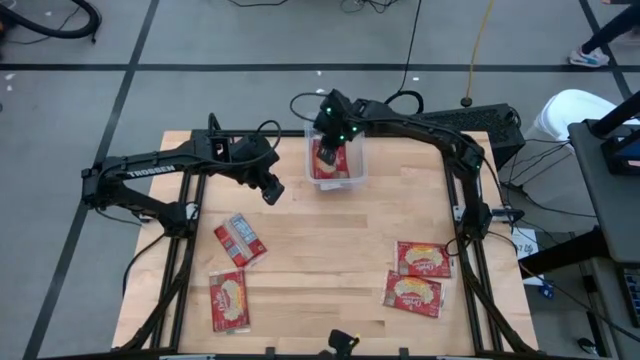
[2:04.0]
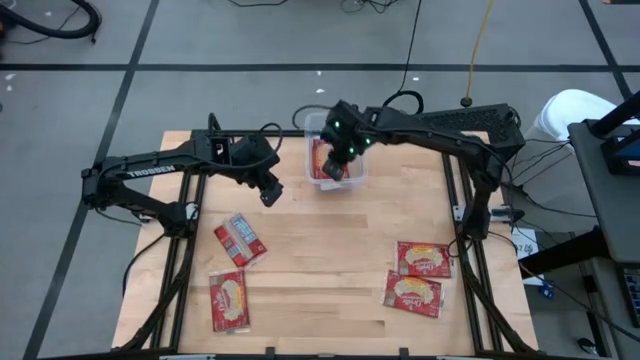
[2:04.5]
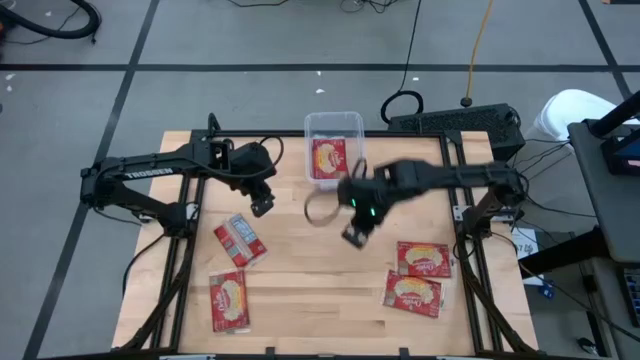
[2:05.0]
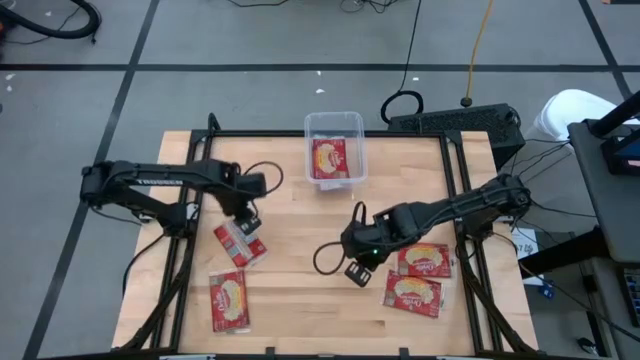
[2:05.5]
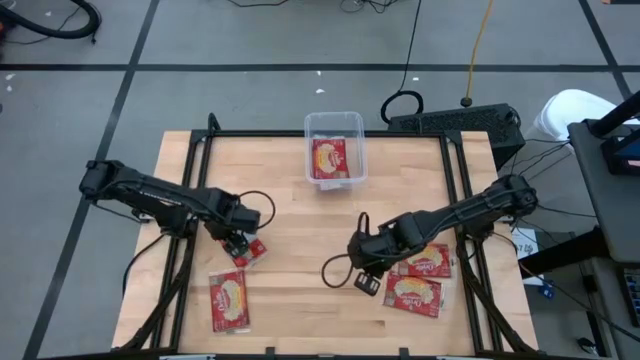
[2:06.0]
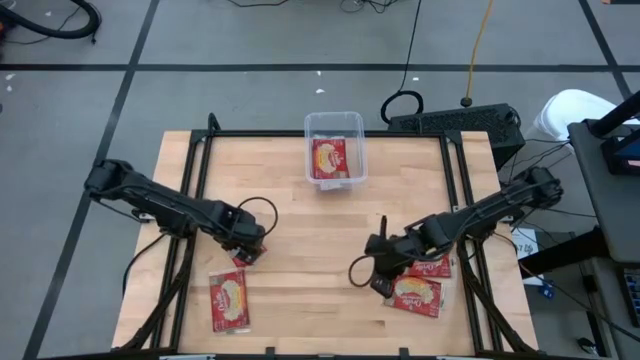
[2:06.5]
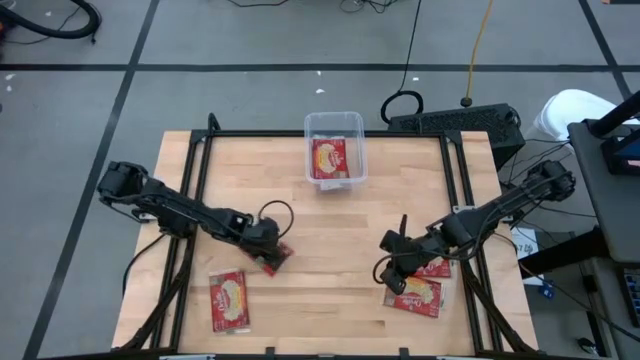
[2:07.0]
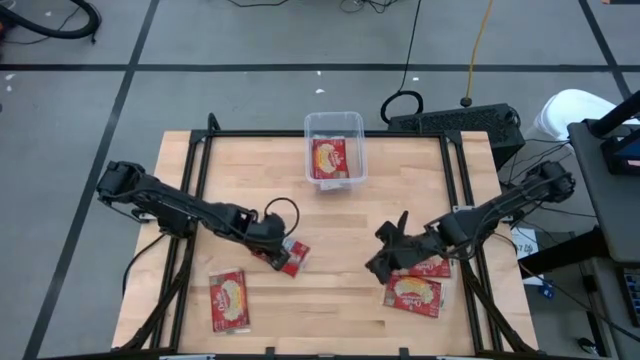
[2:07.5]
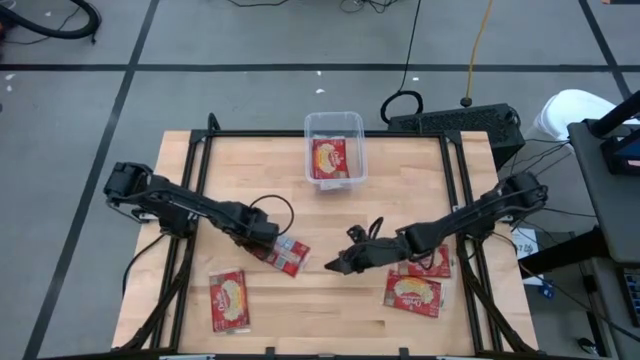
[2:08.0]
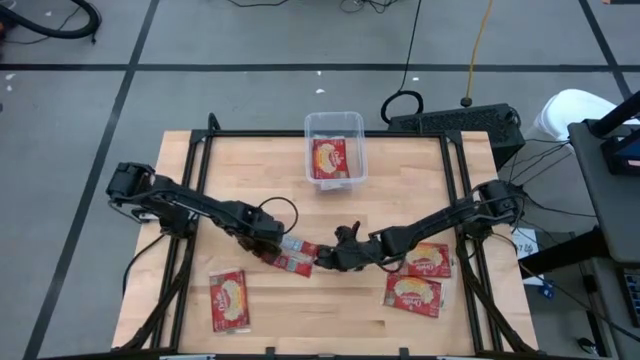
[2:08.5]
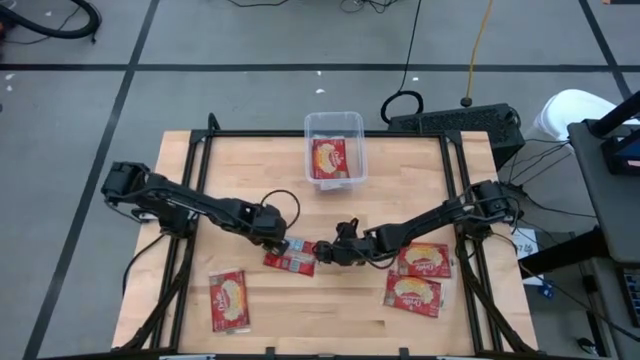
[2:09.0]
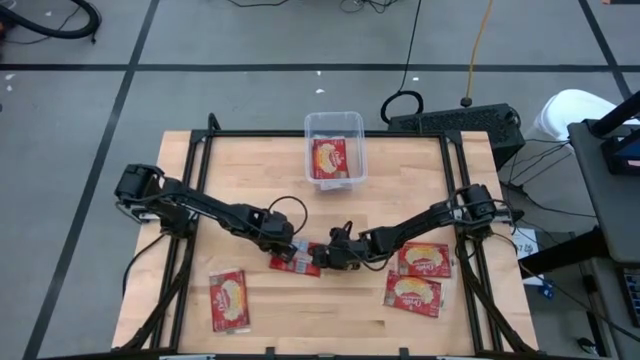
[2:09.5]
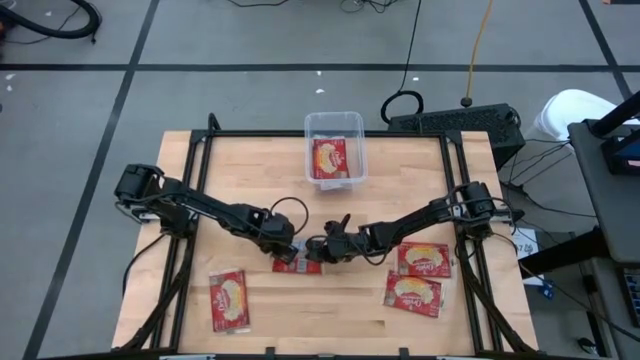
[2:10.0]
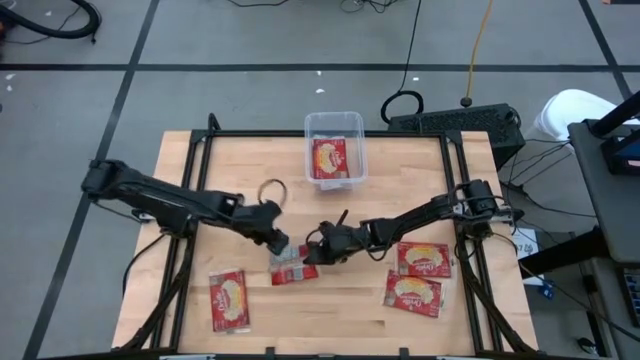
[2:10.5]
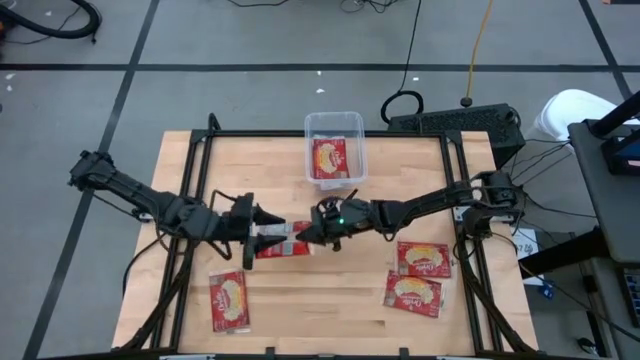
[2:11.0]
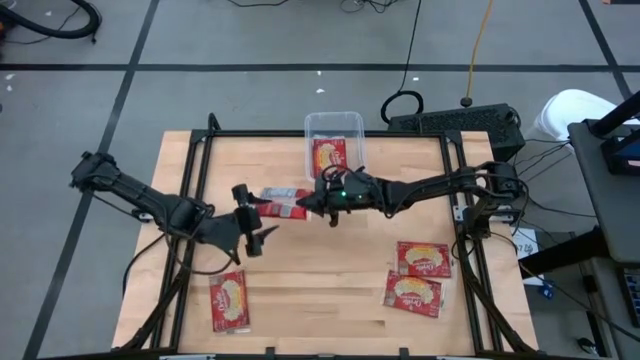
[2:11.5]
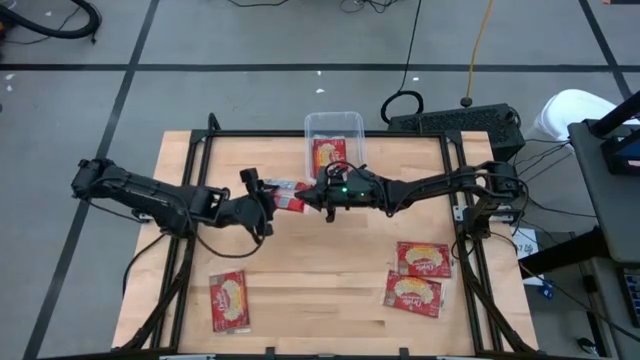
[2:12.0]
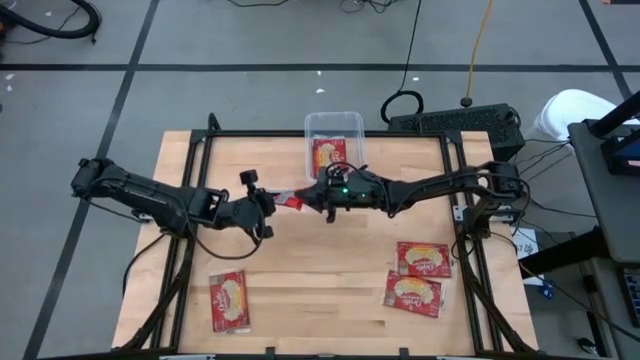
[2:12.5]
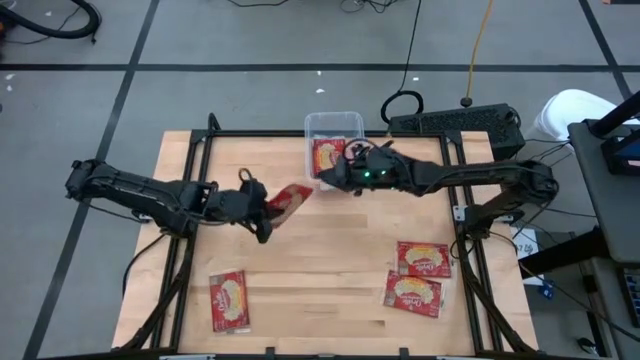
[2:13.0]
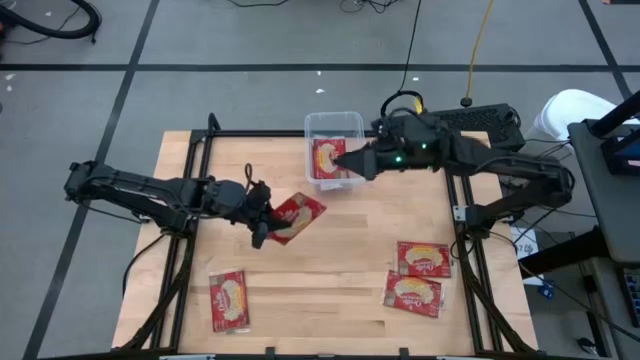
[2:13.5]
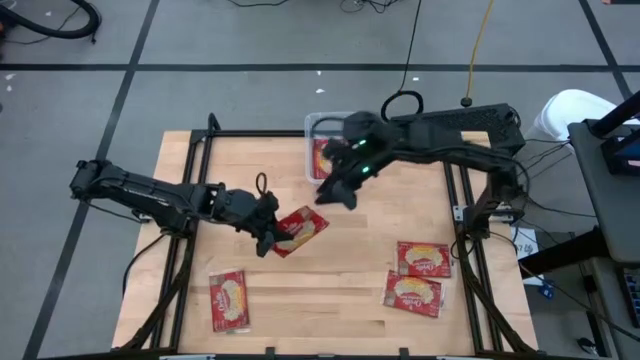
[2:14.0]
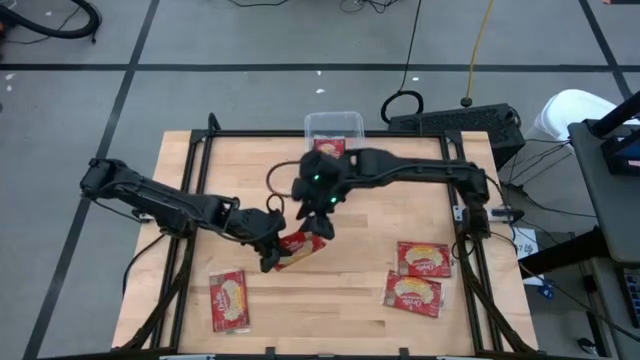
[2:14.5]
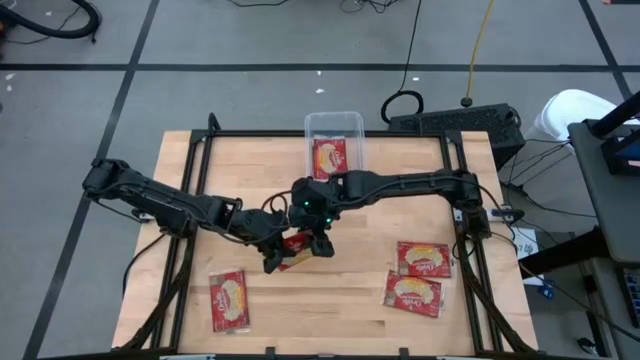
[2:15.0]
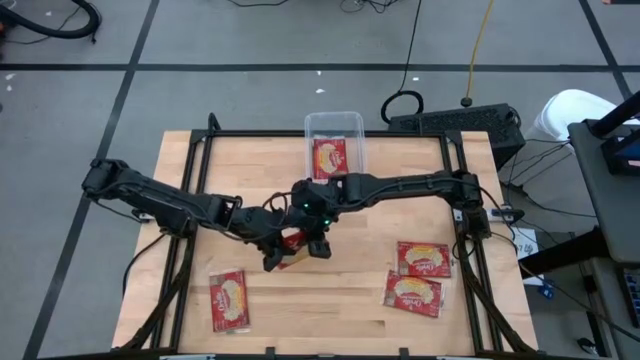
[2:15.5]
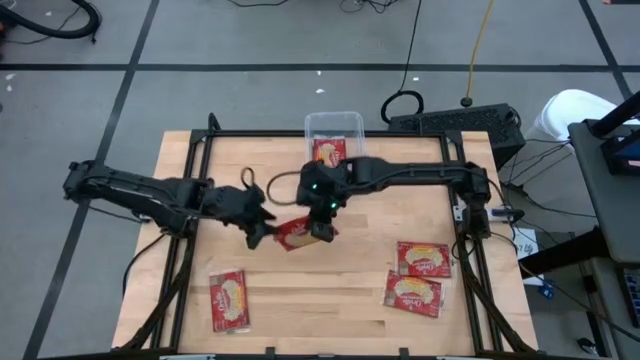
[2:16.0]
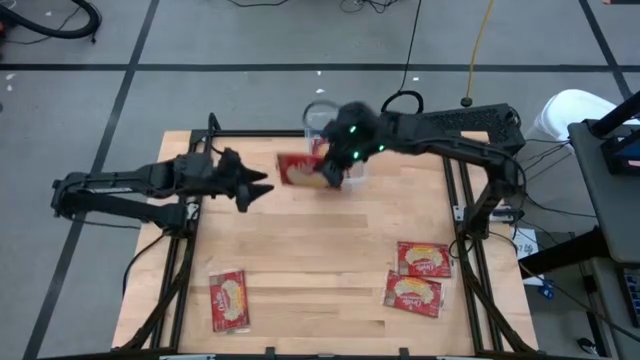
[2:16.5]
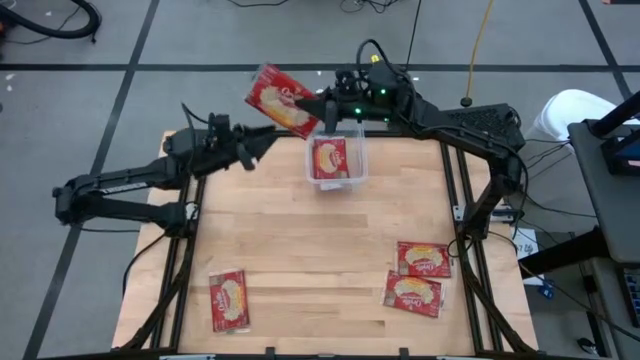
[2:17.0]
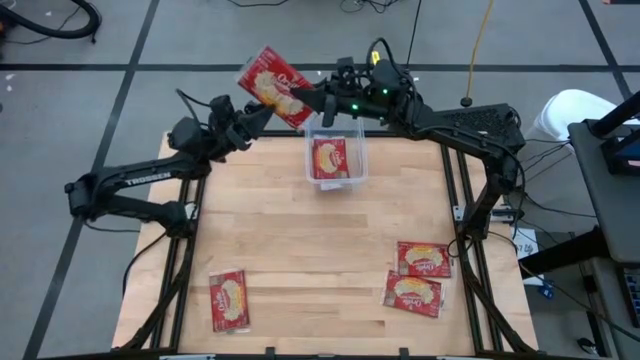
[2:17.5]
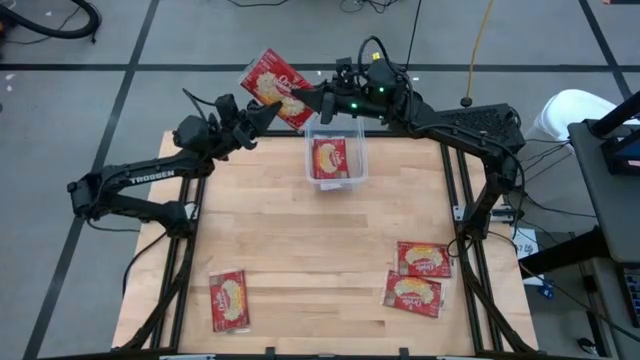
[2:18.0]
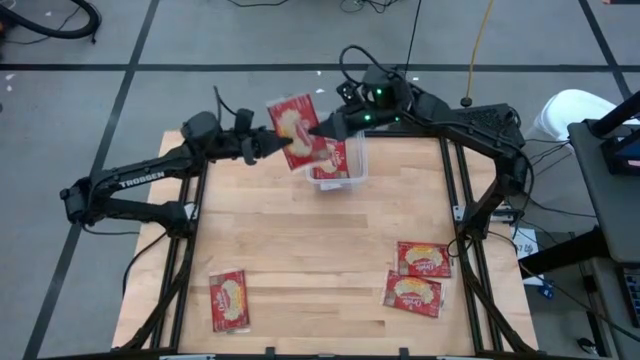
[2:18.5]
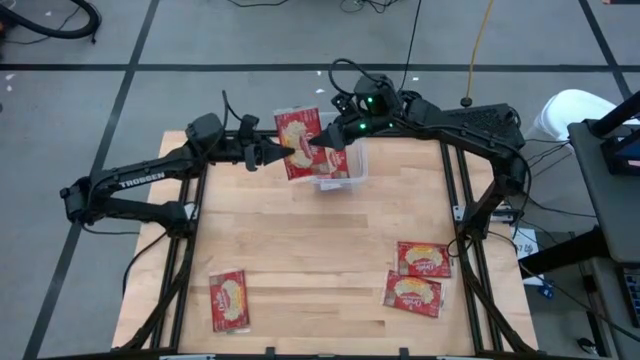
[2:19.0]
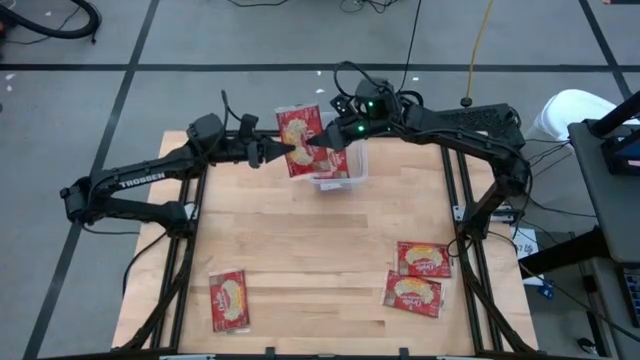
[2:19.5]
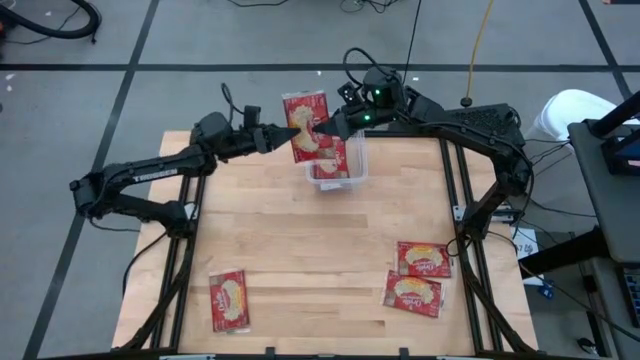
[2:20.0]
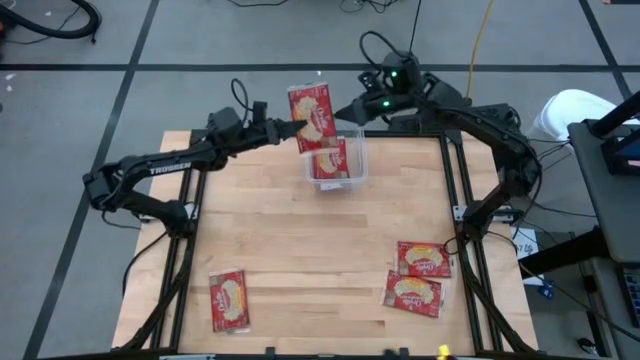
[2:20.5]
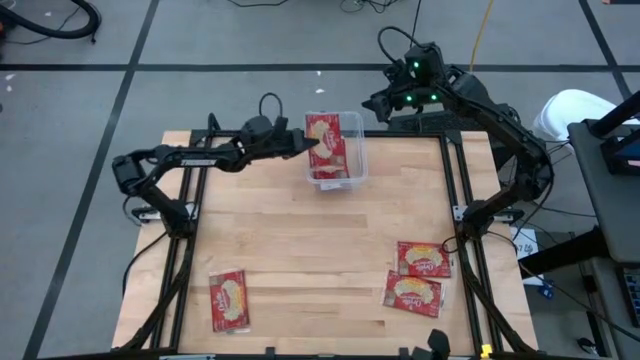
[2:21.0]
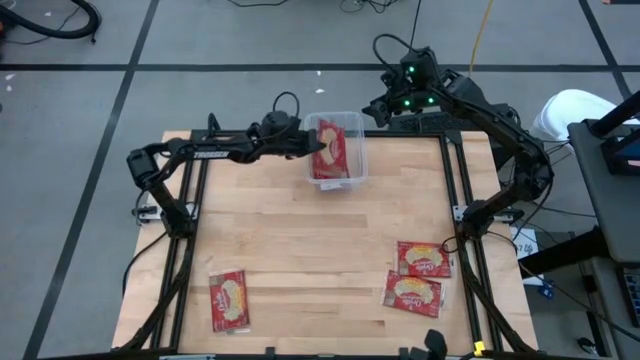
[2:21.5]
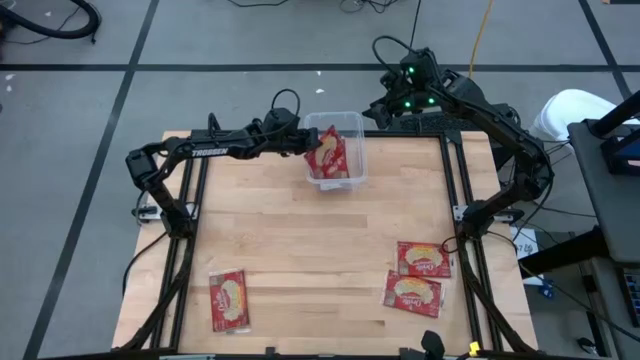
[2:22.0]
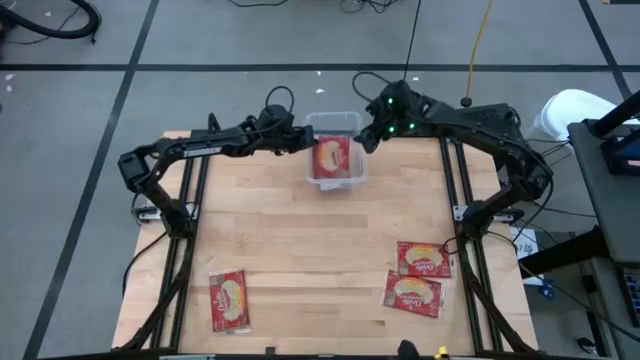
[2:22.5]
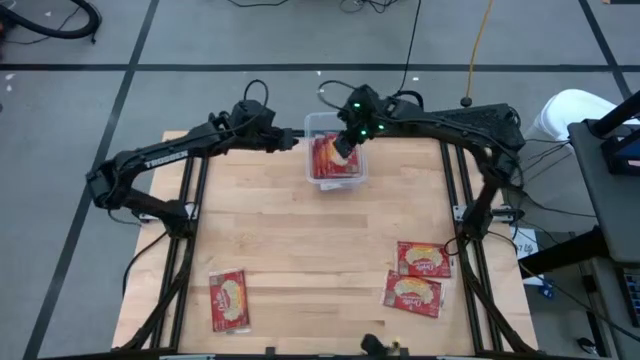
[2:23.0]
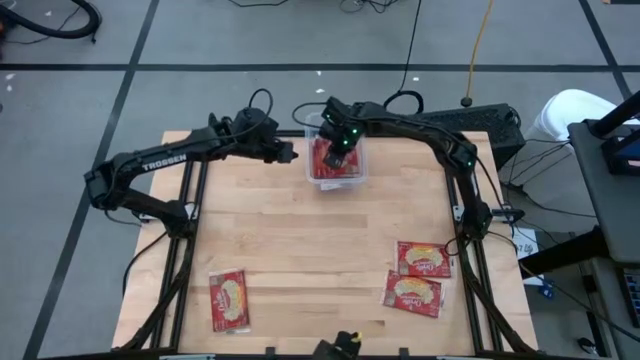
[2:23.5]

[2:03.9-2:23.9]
Task: Sort popcorn bags into baskets
Put the red popcorn bag into the transparent container

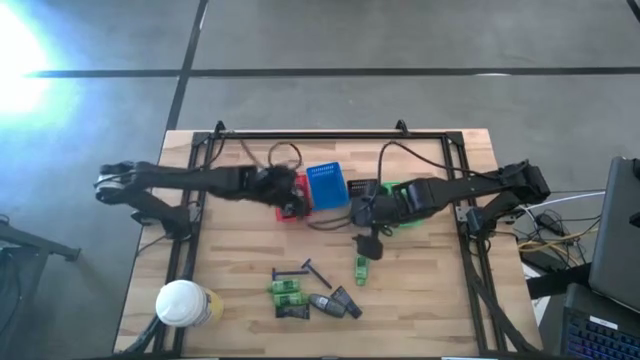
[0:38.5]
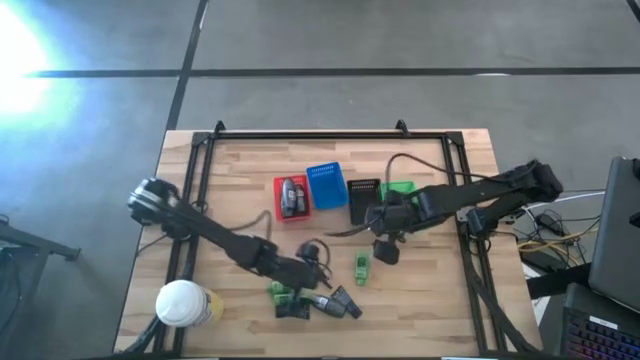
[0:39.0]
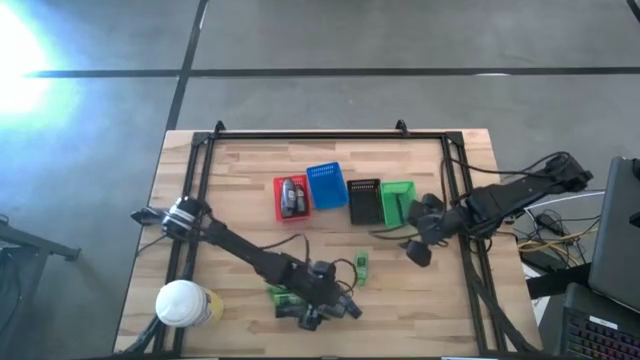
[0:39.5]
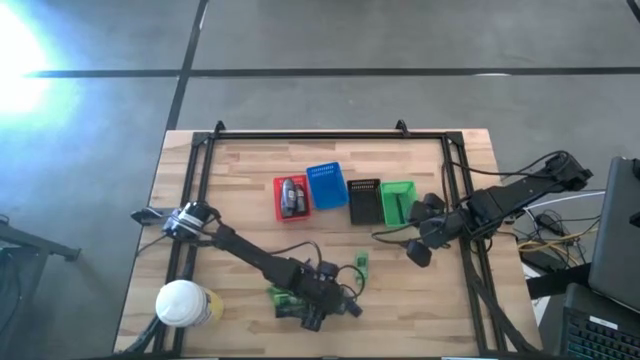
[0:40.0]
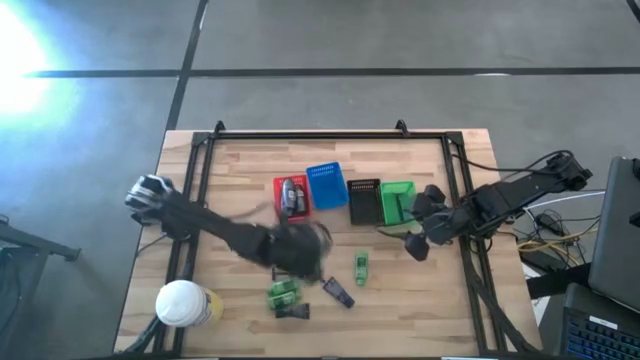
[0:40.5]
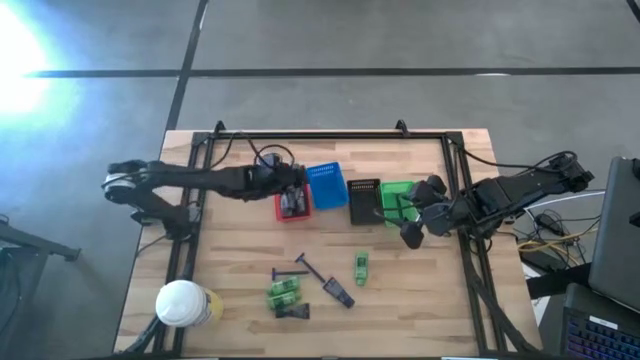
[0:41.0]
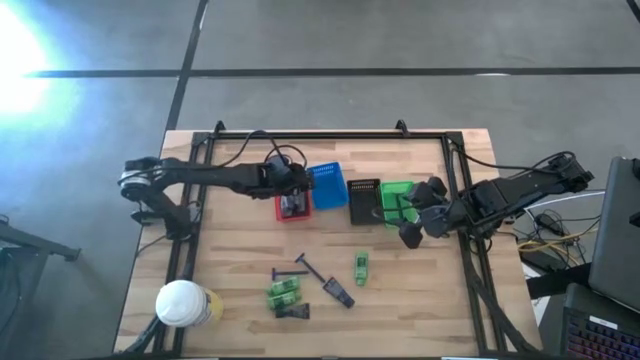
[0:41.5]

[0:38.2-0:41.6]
Task: Pick & Place Travel size toiletries
Put the gray deodorant into the red bin
